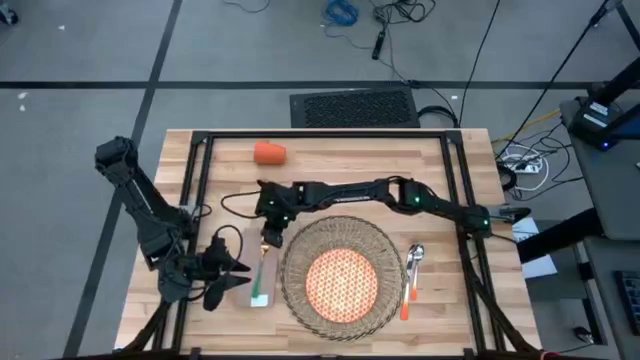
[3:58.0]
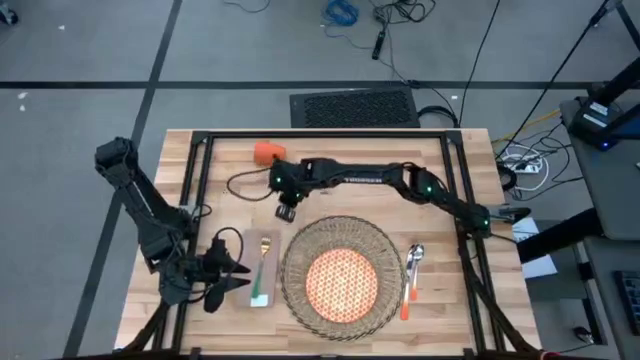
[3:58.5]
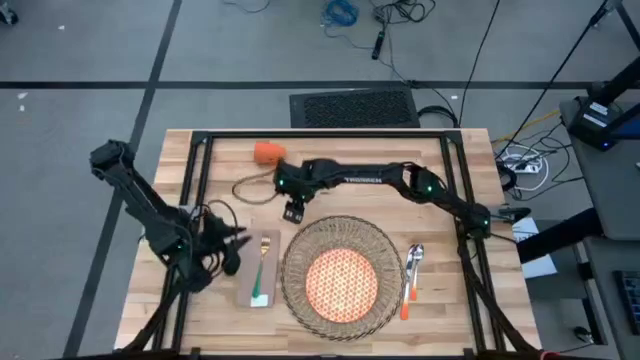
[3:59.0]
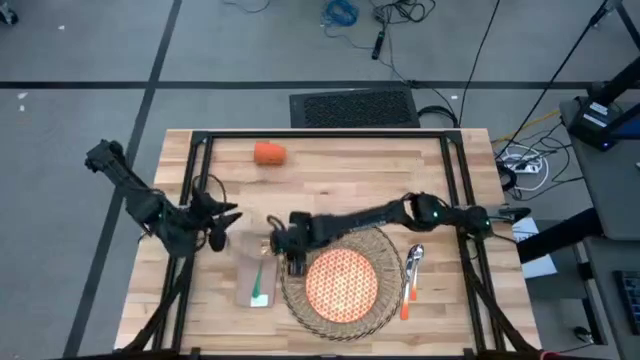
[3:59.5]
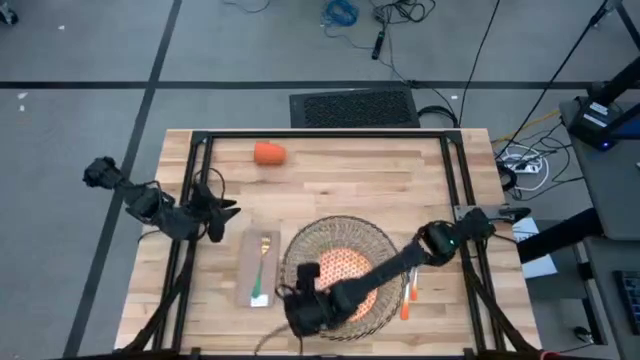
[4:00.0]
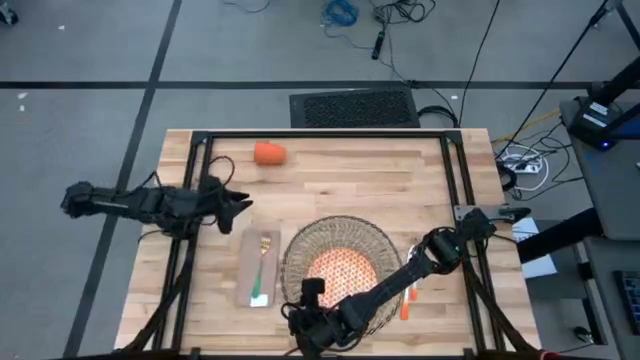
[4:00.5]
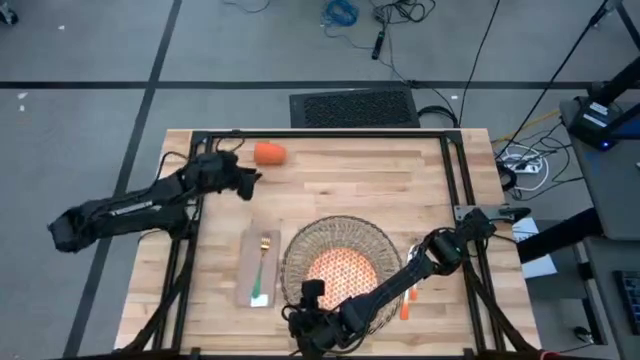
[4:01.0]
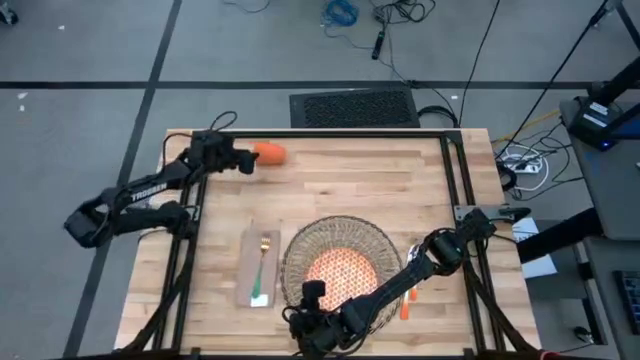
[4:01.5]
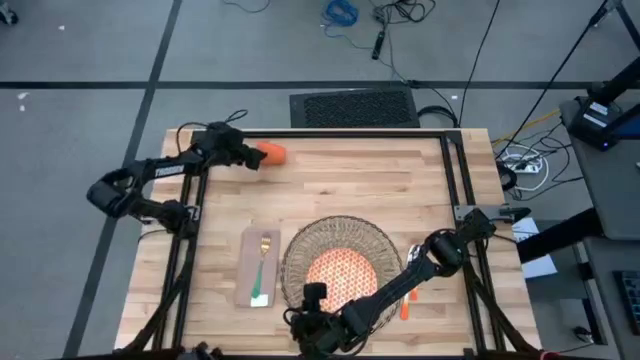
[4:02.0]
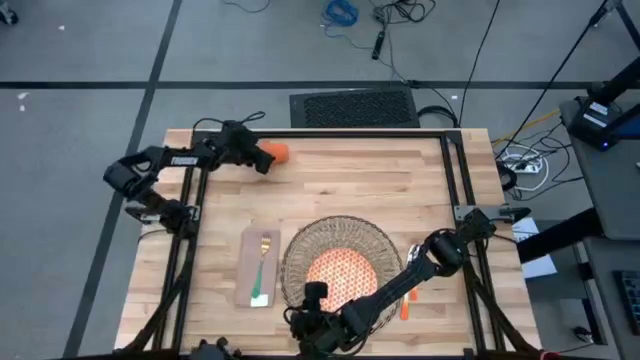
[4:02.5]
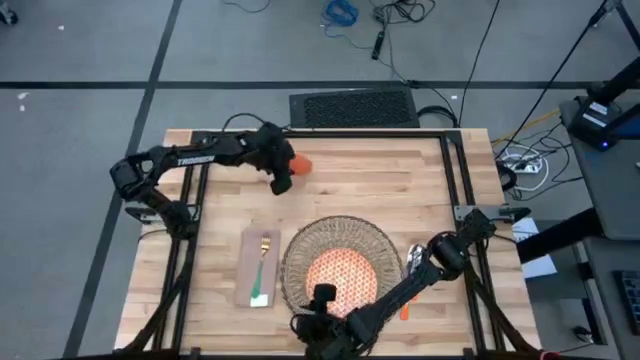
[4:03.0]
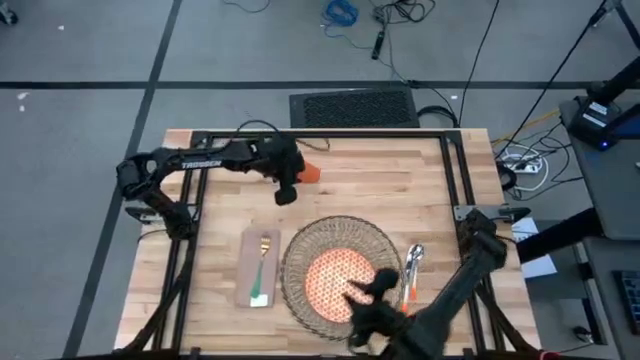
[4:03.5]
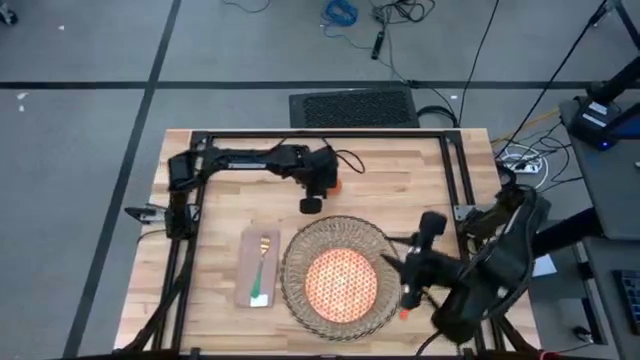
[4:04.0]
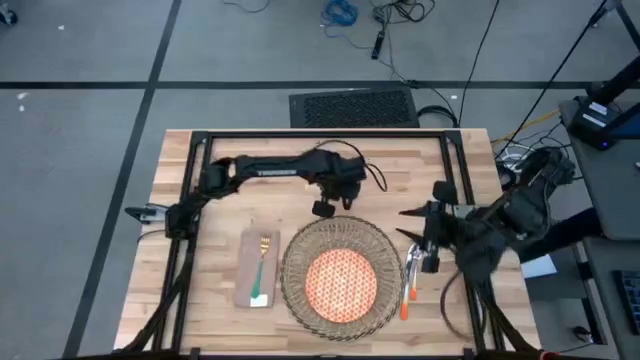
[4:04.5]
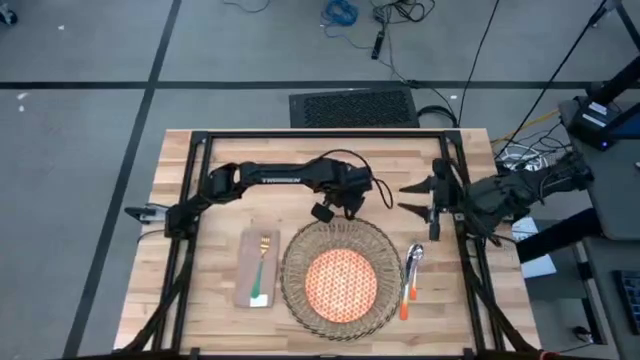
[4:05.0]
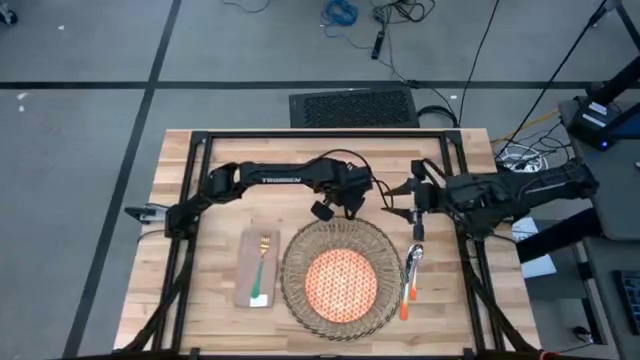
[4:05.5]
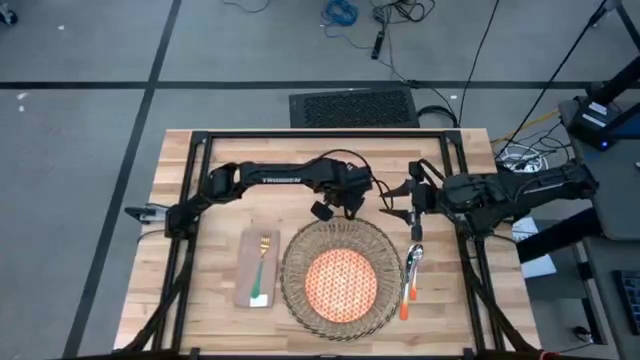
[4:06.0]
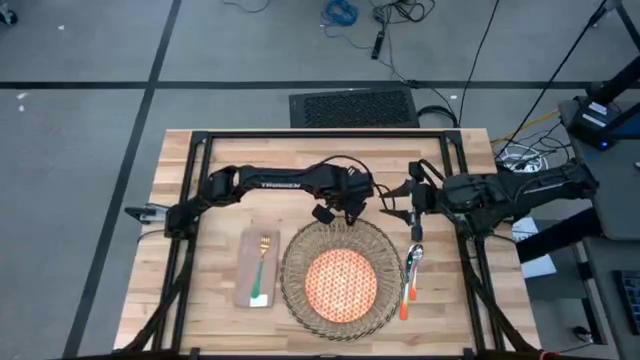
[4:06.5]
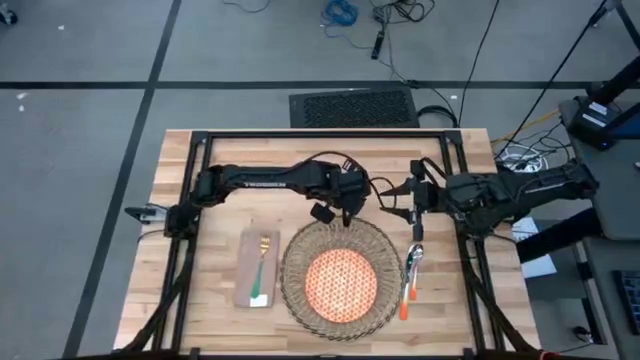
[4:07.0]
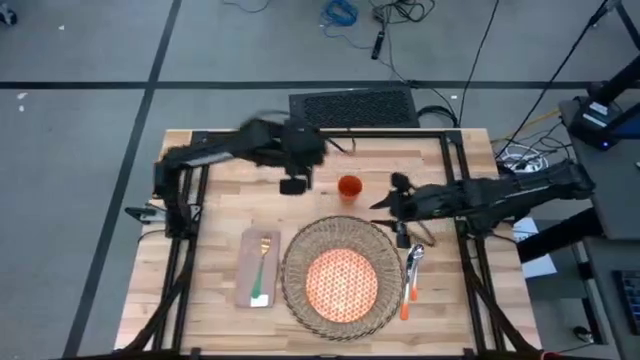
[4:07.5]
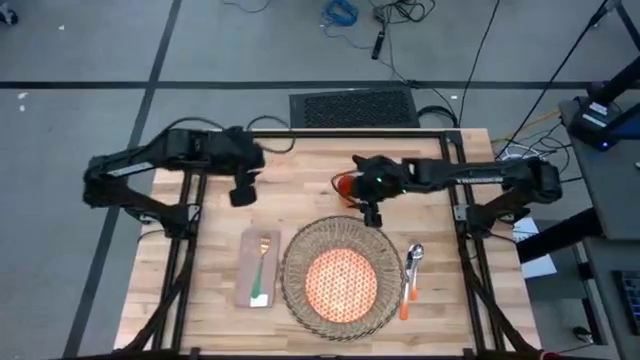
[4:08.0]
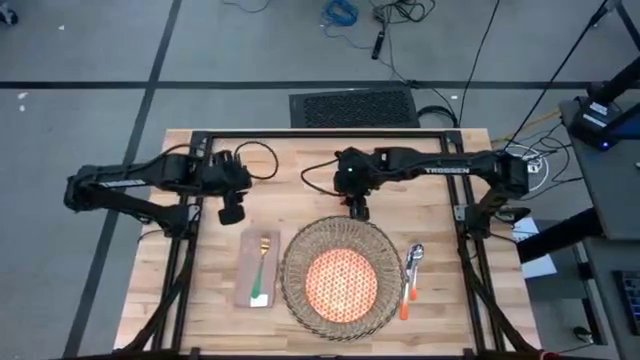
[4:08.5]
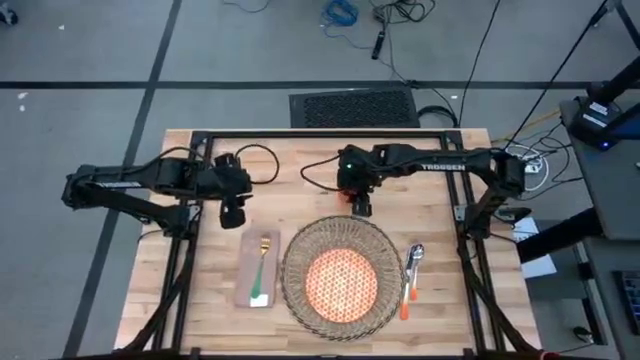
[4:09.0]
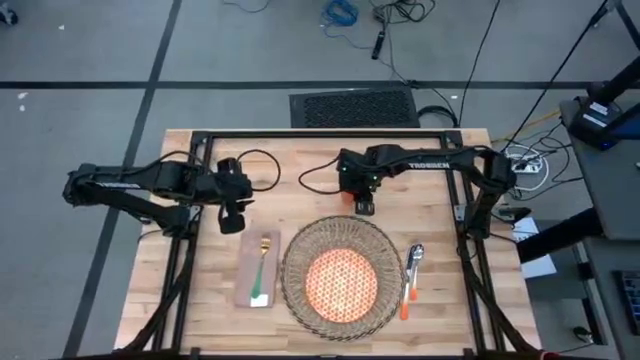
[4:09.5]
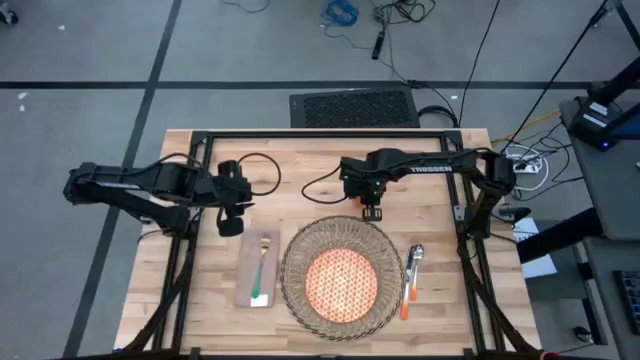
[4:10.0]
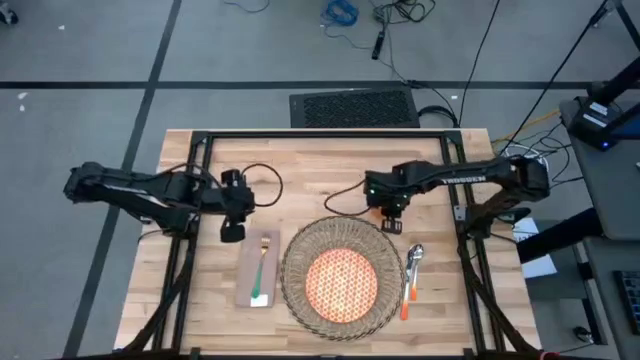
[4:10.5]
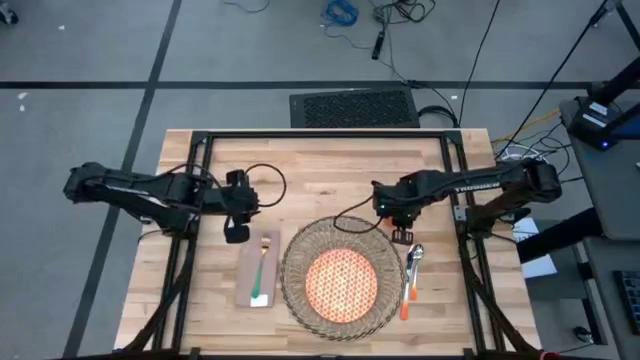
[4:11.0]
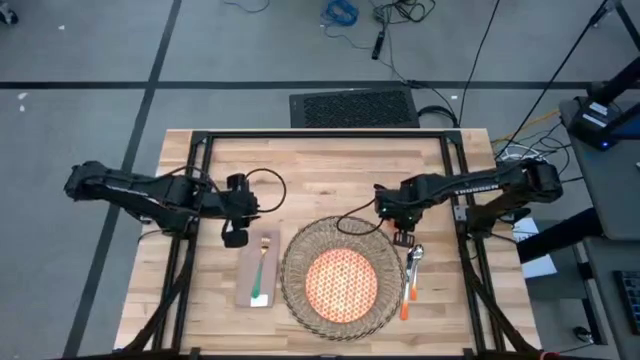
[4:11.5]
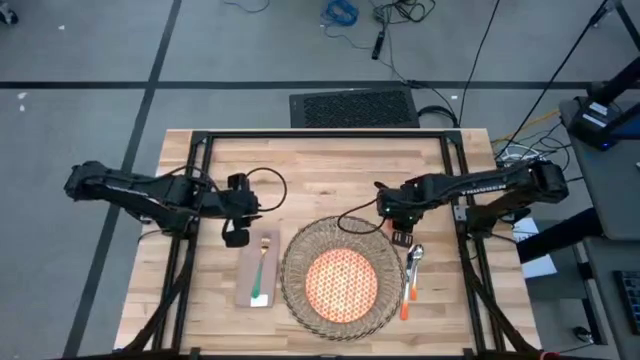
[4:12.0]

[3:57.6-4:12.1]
Task: Set table place
Put the orange cup to the top right of the brown mat

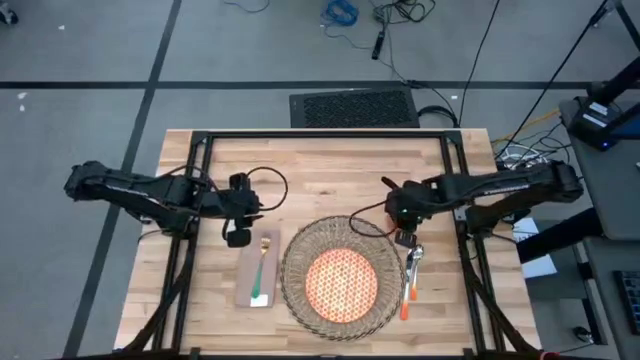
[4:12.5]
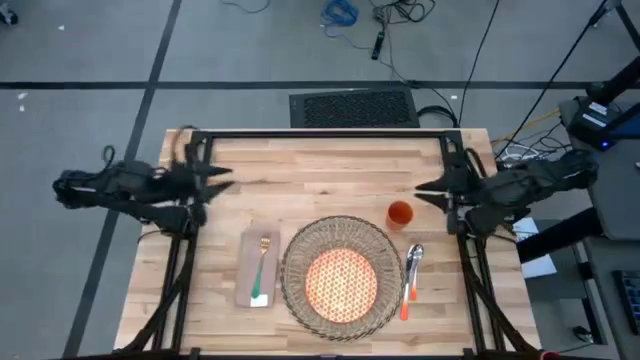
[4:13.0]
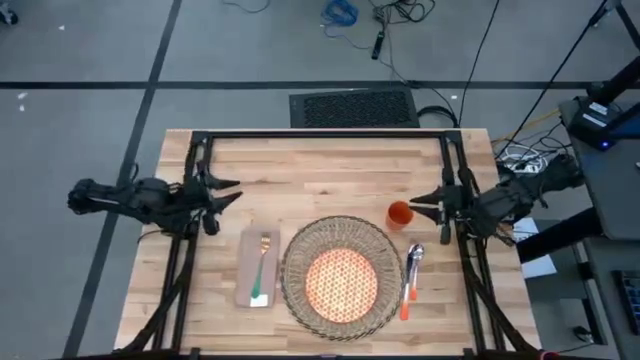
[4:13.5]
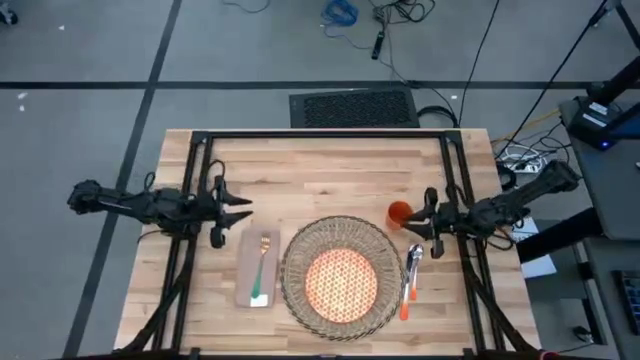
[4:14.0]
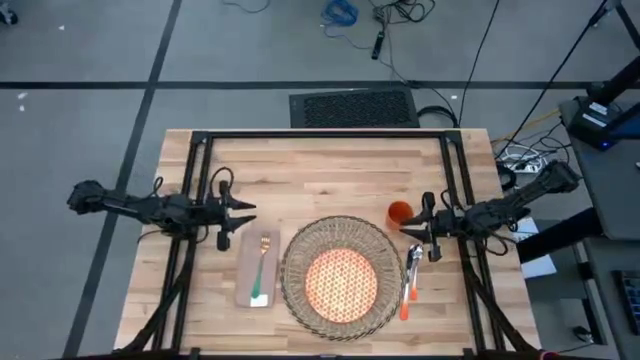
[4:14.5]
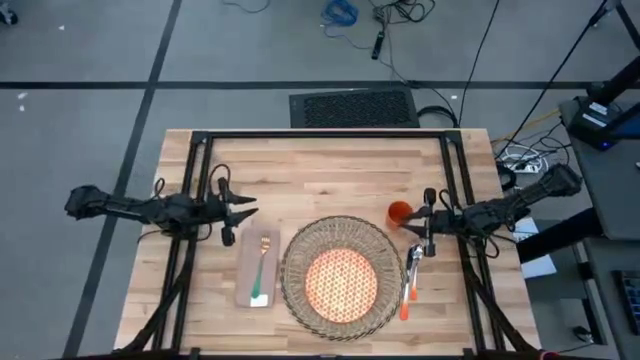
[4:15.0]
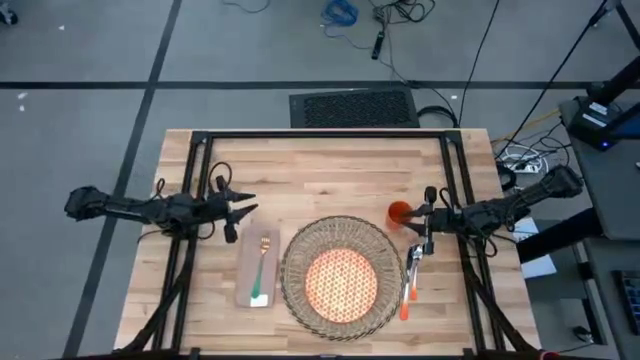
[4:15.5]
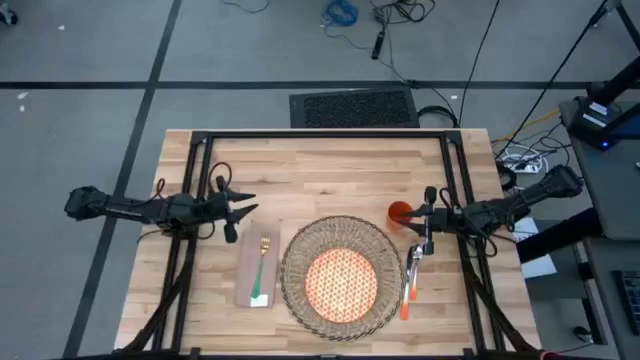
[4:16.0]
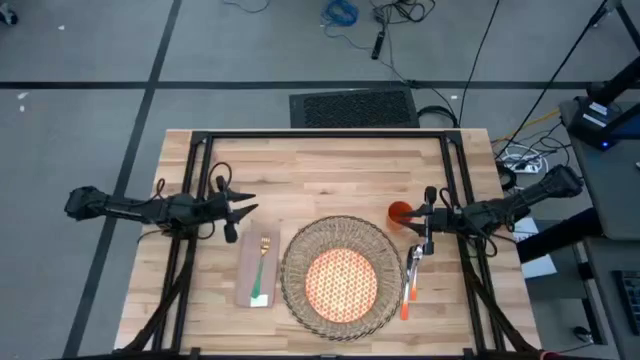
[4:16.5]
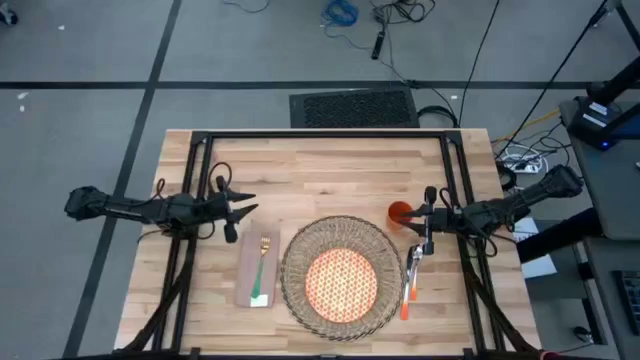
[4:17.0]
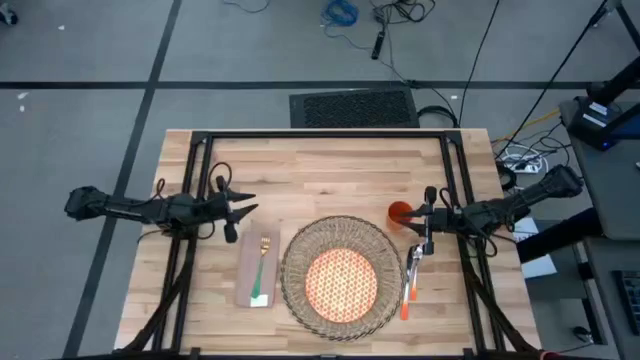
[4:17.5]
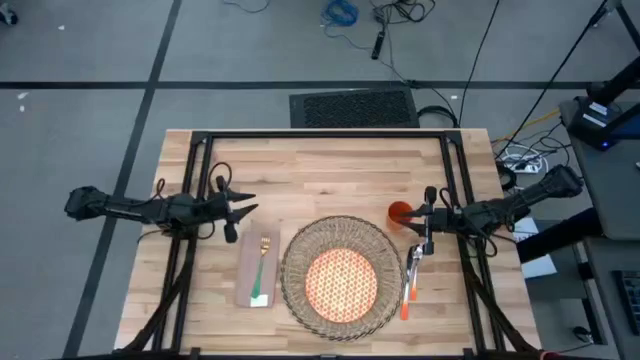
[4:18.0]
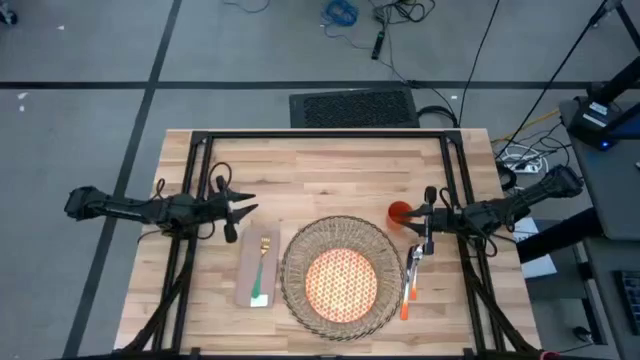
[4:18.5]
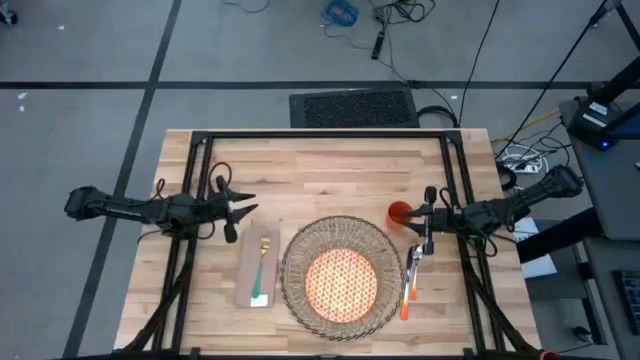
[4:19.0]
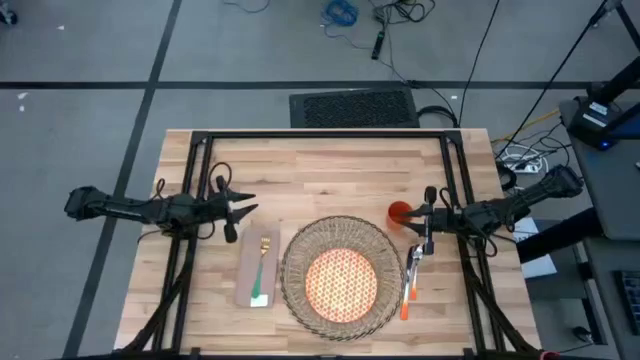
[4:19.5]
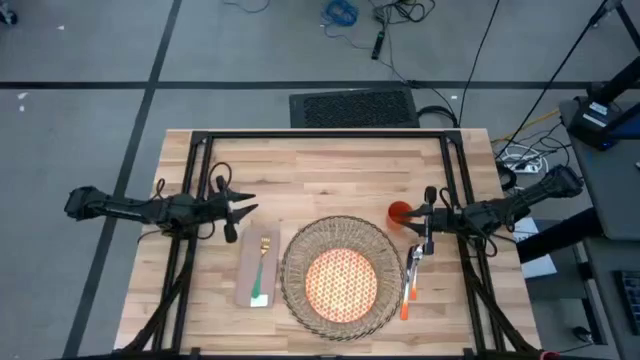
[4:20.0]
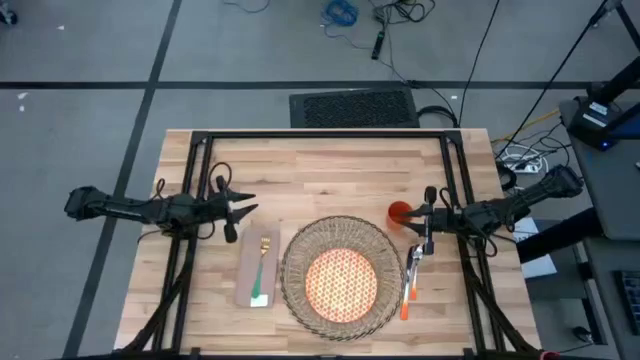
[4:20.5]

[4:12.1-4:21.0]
Return to Home Position
